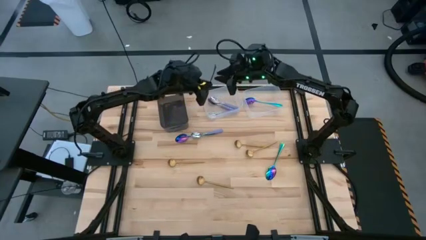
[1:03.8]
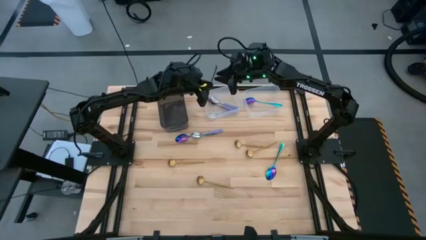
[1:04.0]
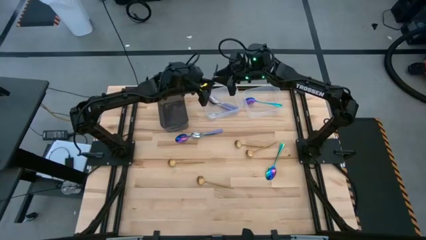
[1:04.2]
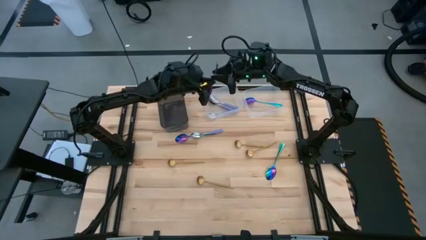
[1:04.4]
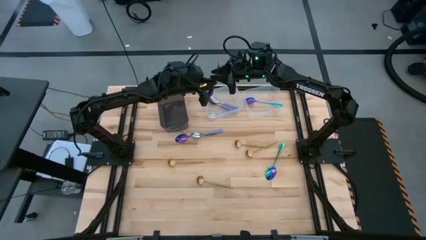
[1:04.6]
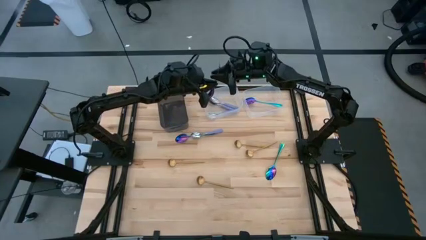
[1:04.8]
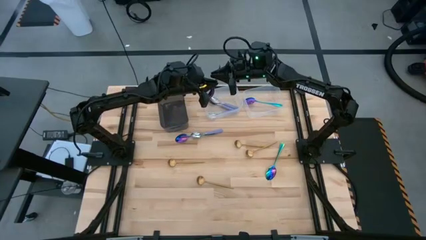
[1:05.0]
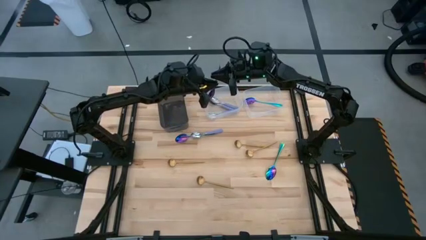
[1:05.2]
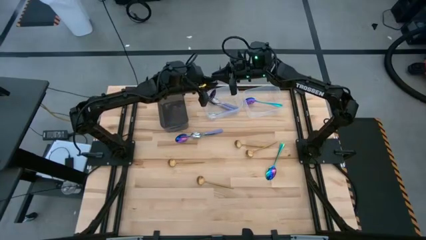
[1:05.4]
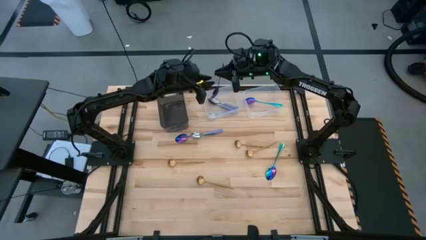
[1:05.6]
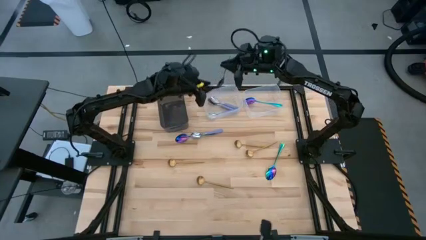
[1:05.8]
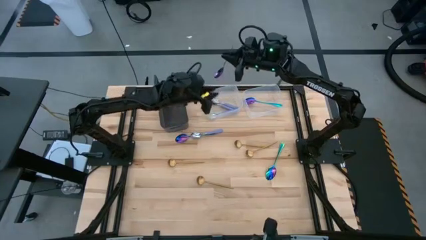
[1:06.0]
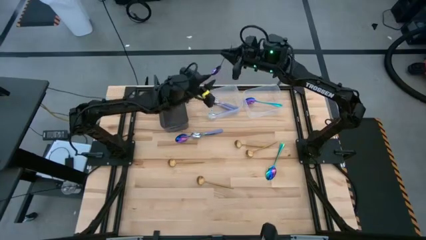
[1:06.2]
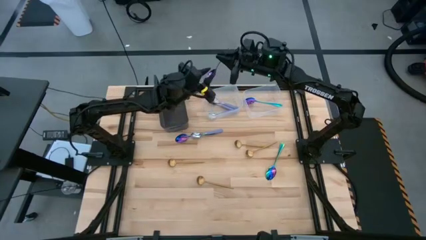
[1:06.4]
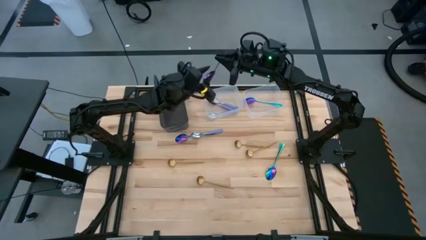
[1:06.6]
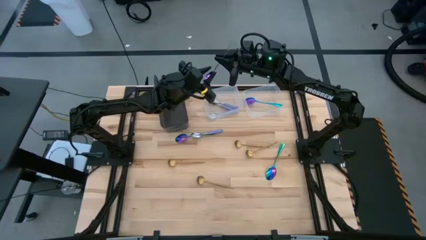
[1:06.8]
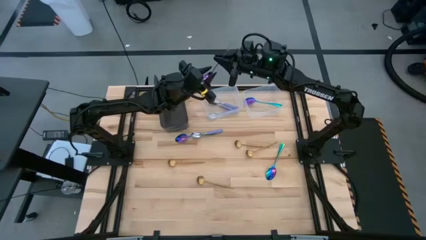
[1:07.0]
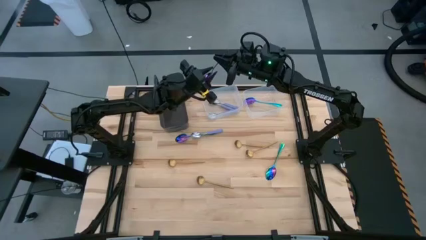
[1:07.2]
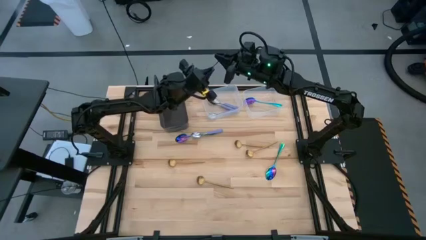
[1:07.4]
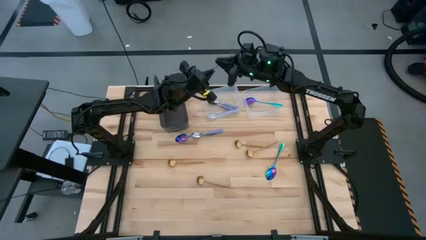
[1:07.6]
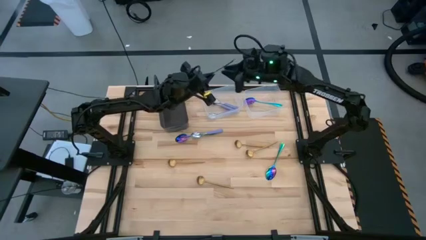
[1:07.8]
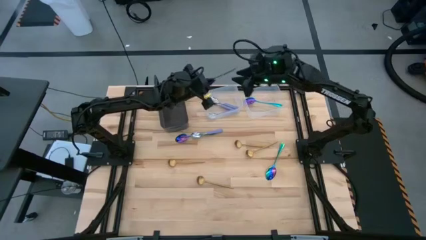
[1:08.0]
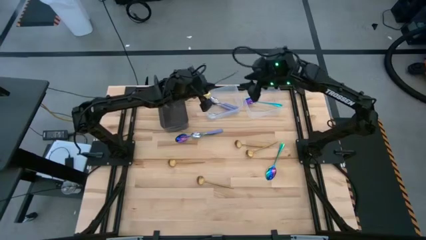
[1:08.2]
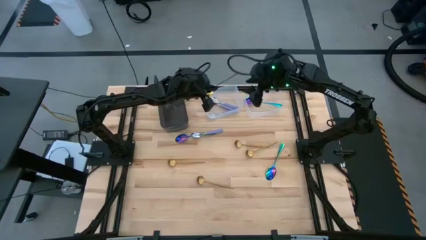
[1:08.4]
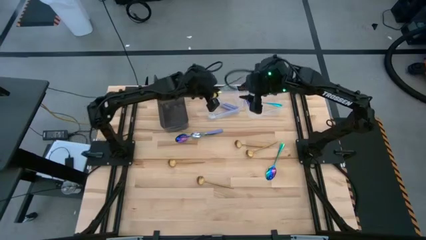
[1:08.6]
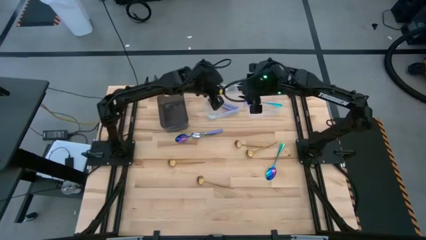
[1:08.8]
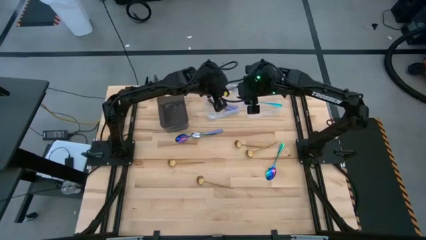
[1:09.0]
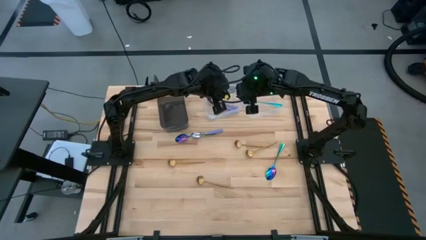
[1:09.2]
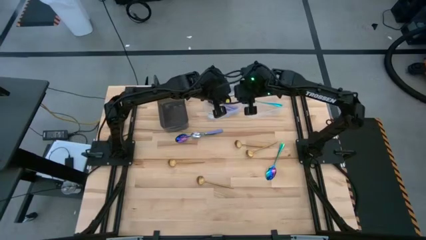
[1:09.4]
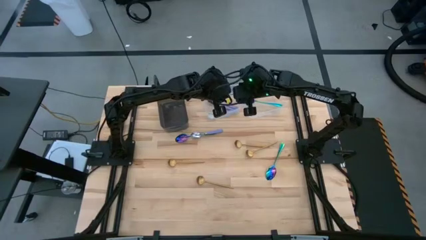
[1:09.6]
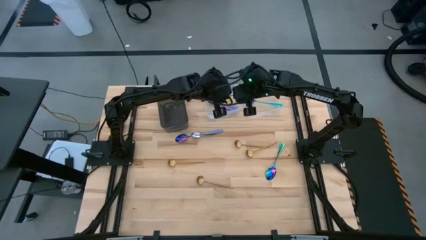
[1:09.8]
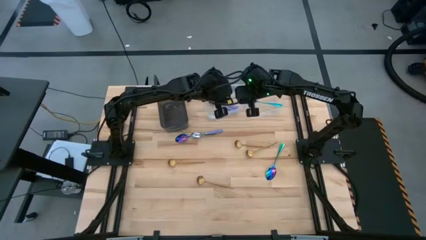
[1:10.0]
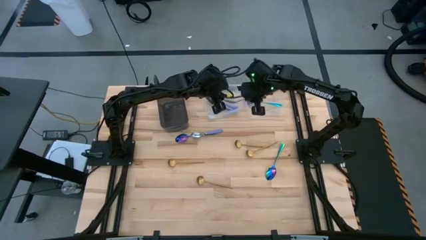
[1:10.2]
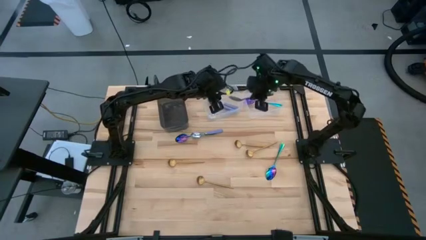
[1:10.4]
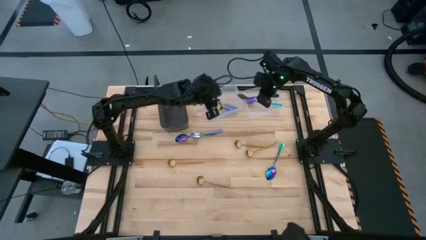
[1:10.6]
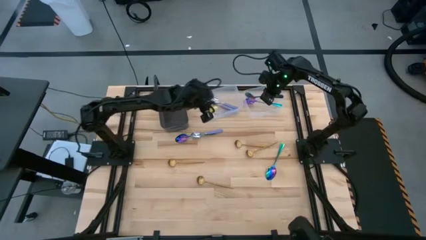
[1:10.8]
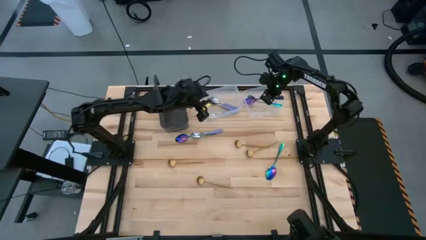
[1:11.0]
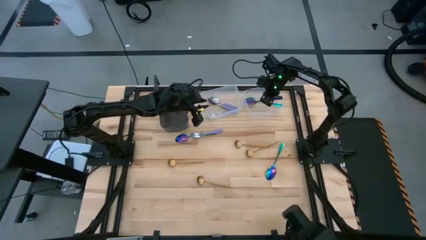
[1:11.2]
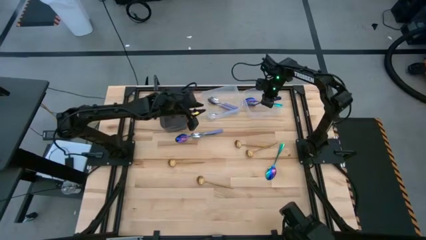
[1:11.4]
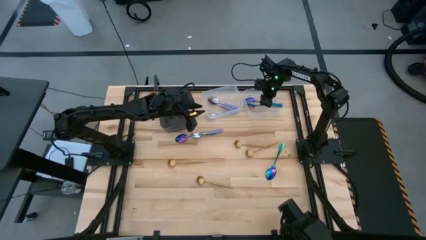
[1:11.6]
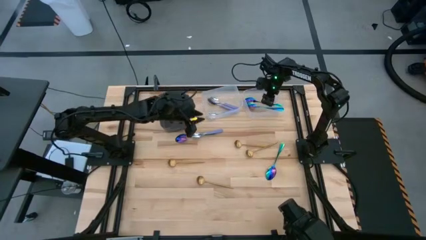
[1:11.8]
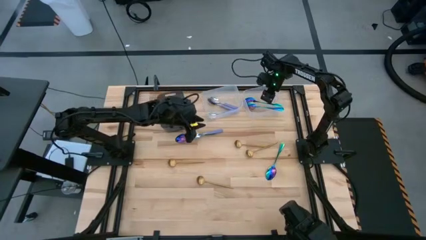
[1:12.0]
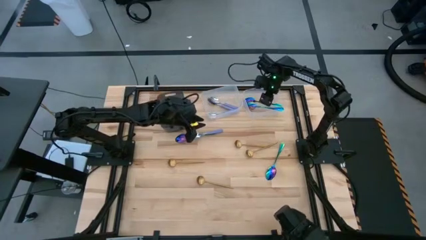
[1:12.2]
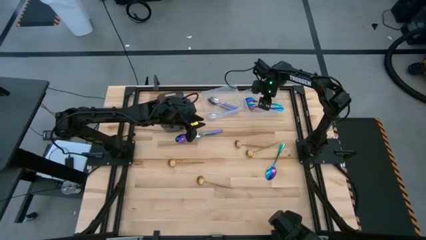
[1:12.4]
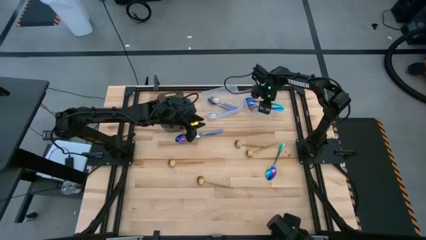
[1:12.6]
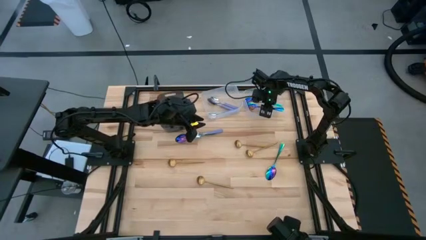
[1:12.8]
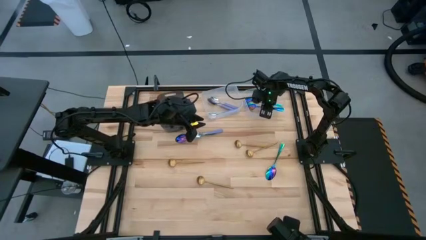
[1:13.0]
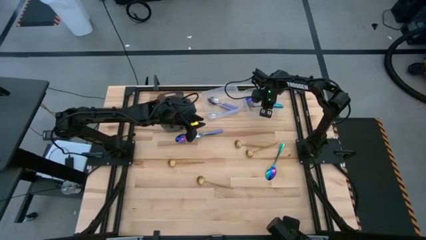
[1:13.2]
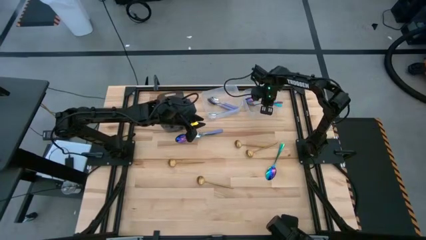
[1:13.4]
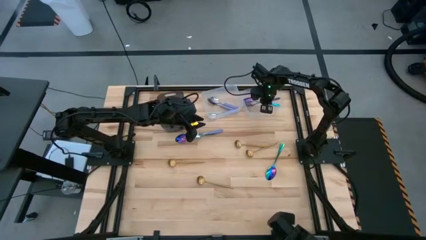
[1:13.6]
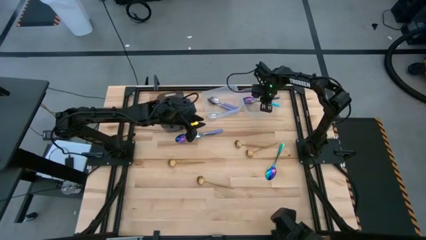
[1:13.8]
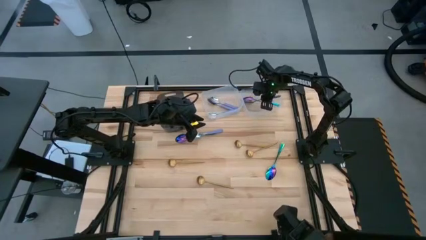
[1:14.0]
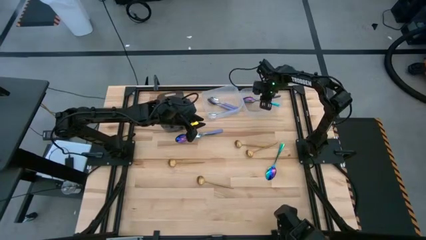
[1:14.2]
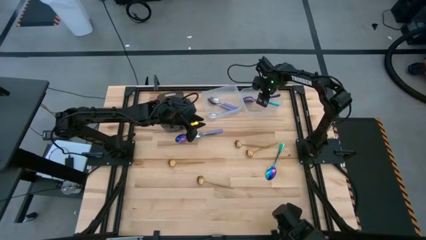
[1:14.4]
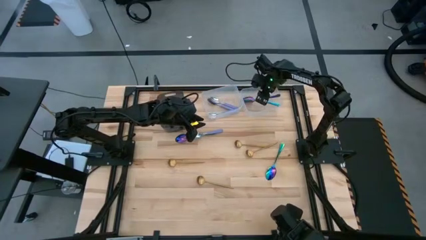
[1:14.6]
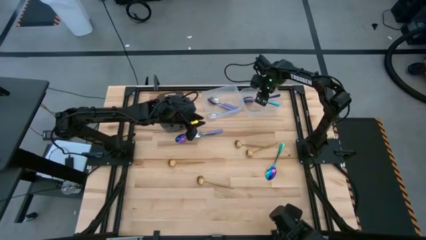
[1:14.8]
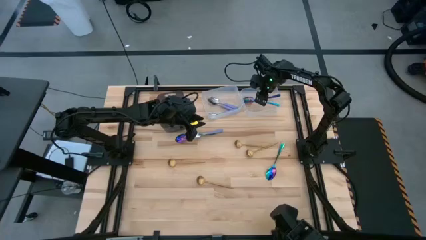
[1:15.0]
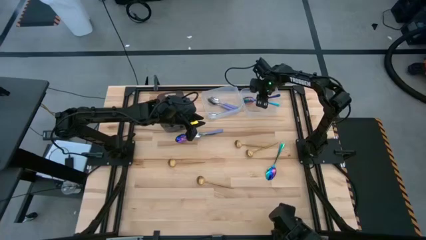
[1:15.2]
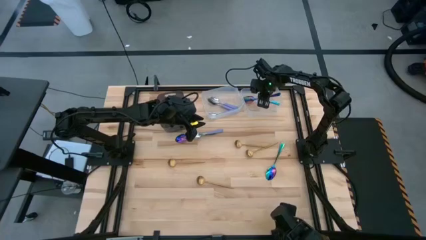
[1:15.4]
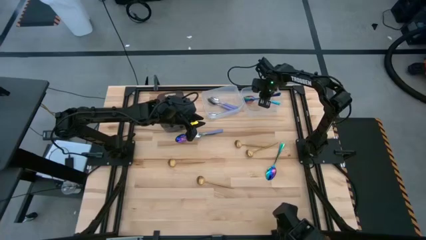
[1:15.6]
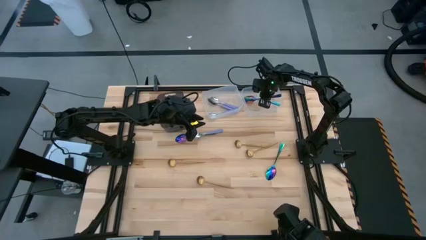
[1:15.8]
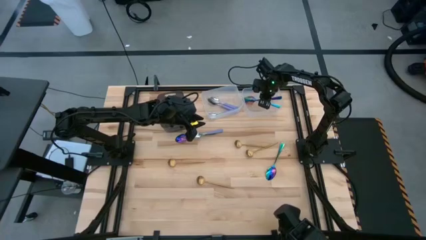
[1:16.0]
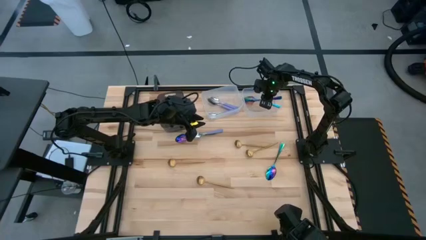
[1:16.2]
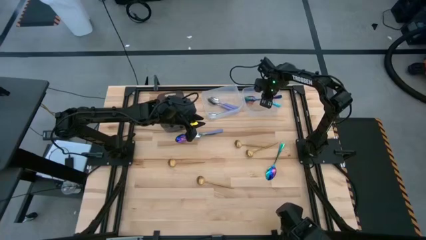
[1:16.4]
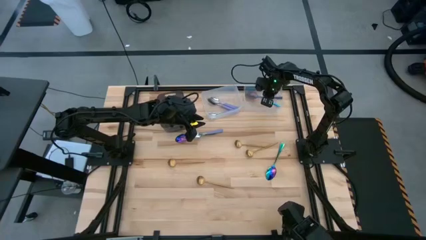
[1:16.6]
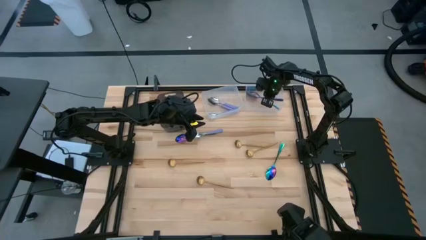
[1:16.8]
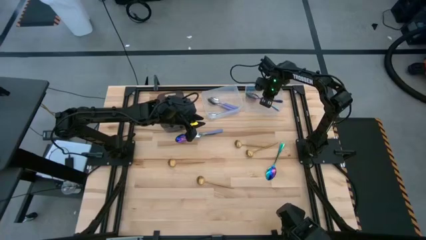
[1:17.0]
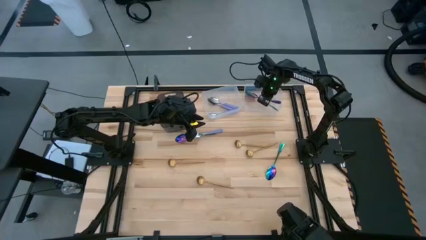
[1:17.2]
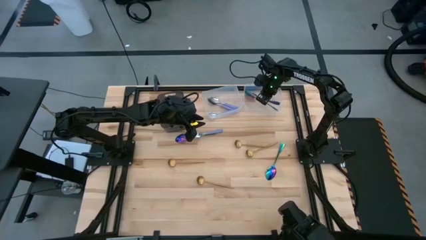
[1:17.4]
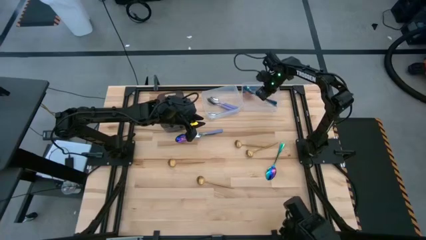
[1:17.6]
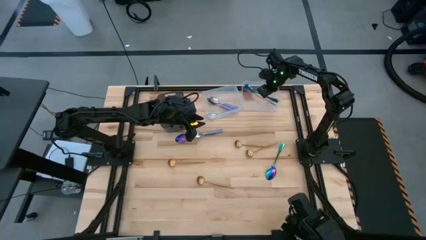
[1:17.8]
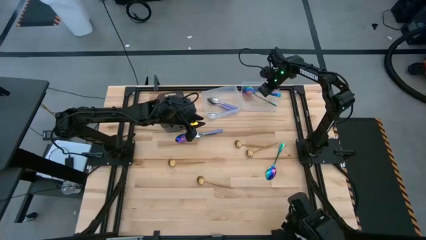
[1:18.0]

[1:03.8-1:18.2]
Task: Sort silverware by color (type)
Put the blue spoon into the right transparent bin
